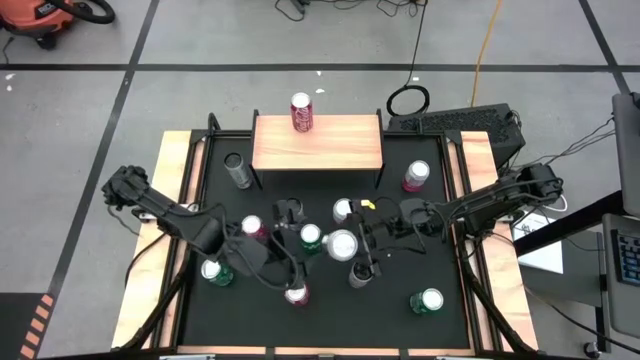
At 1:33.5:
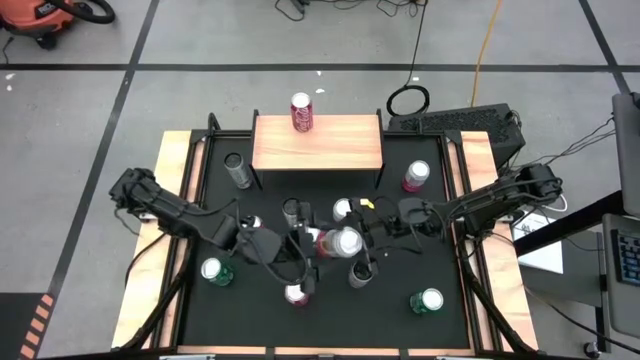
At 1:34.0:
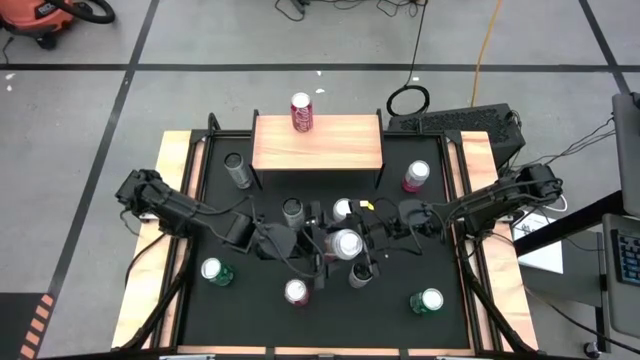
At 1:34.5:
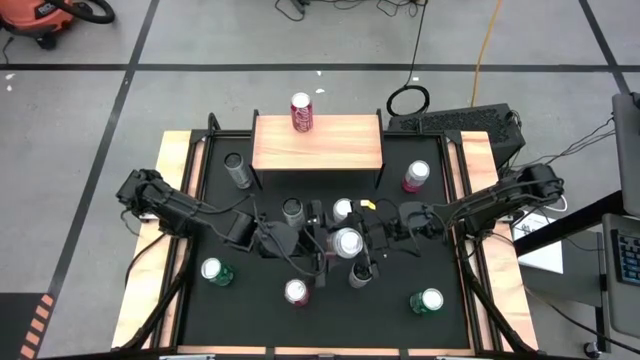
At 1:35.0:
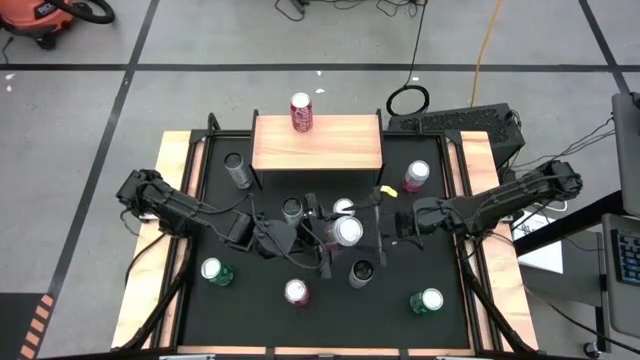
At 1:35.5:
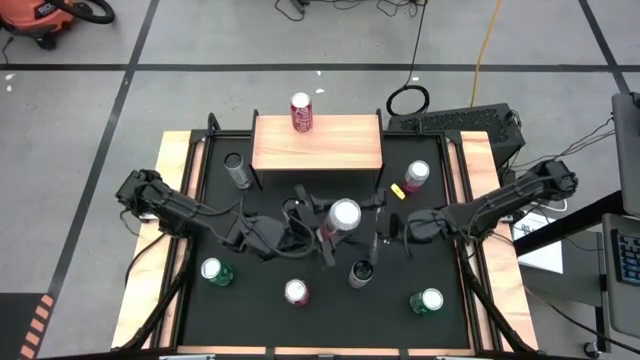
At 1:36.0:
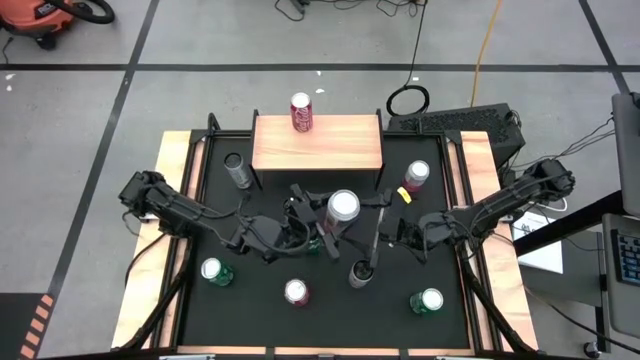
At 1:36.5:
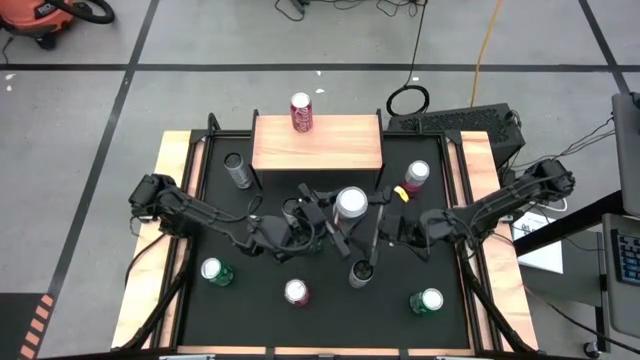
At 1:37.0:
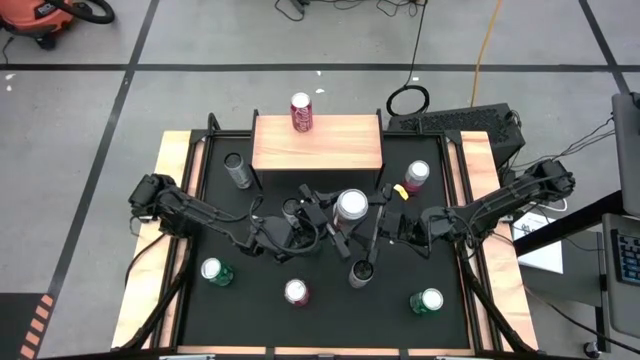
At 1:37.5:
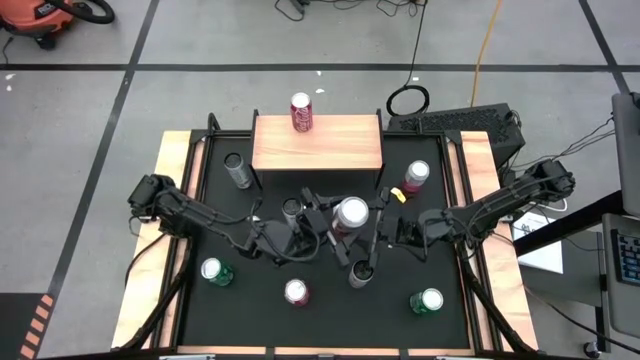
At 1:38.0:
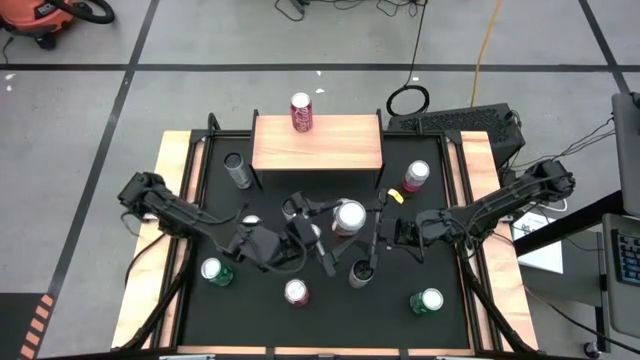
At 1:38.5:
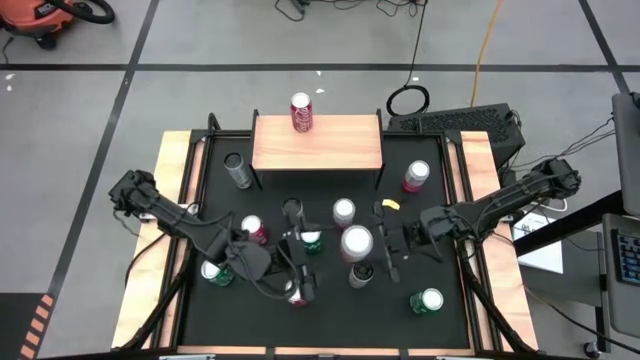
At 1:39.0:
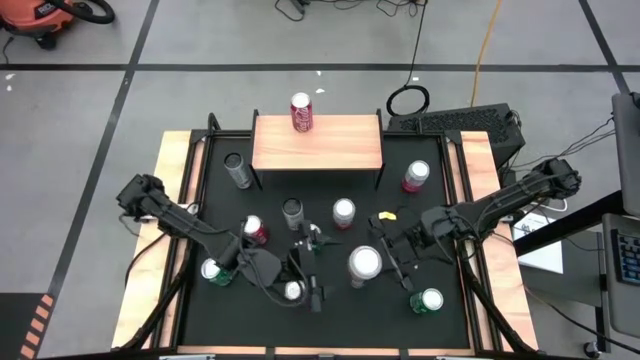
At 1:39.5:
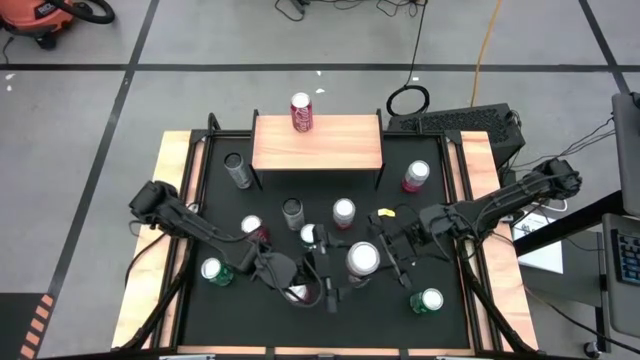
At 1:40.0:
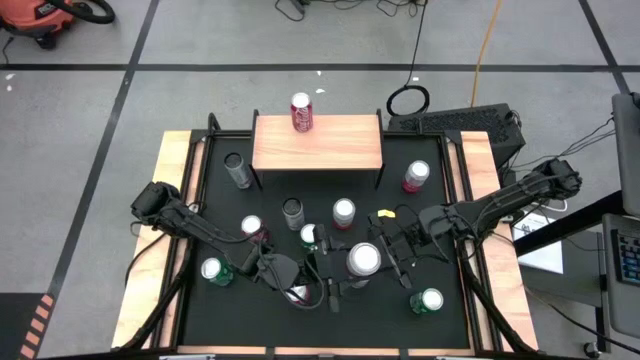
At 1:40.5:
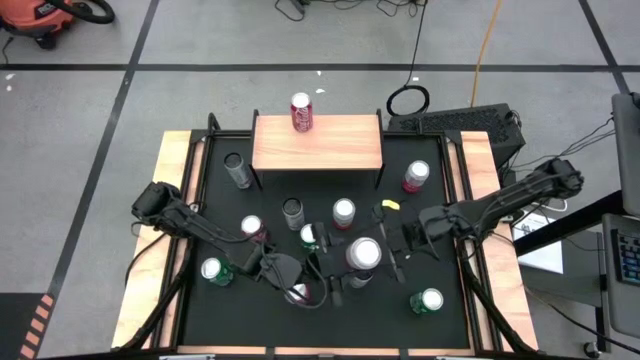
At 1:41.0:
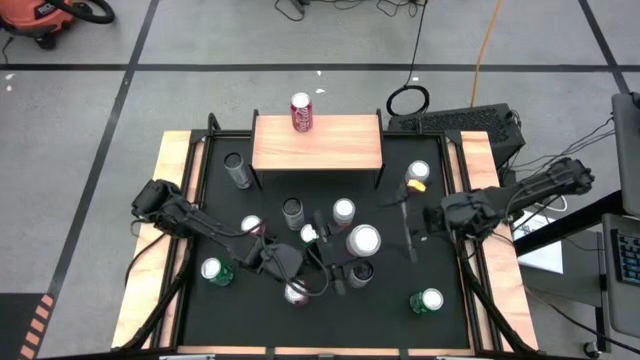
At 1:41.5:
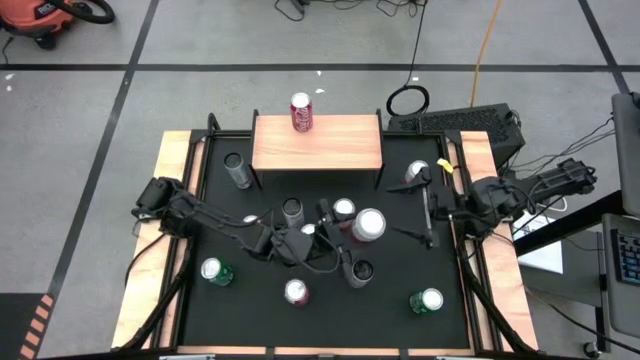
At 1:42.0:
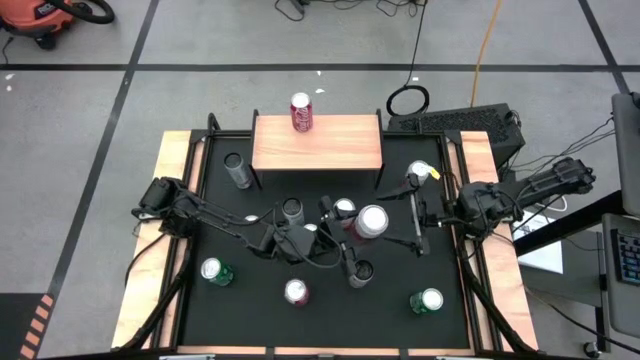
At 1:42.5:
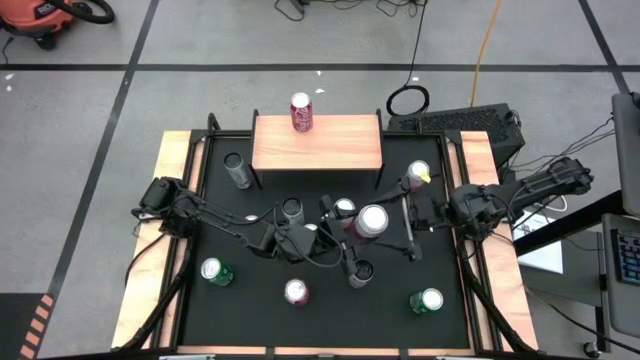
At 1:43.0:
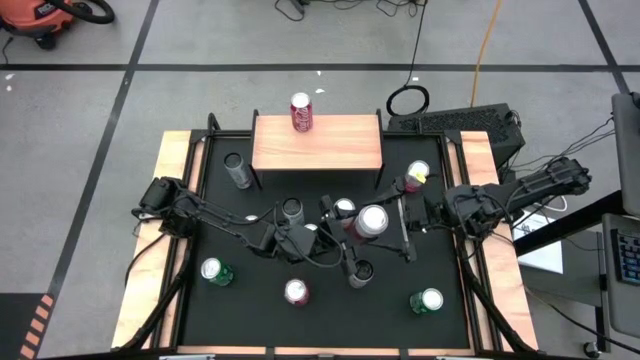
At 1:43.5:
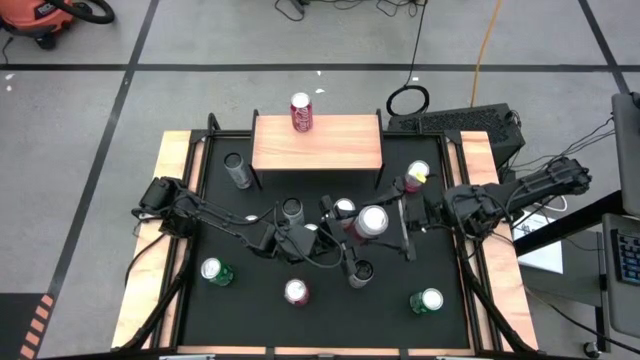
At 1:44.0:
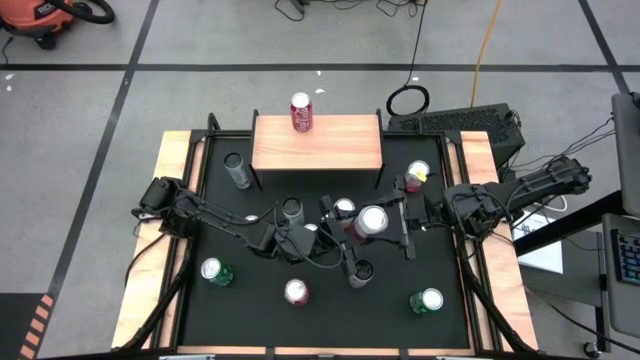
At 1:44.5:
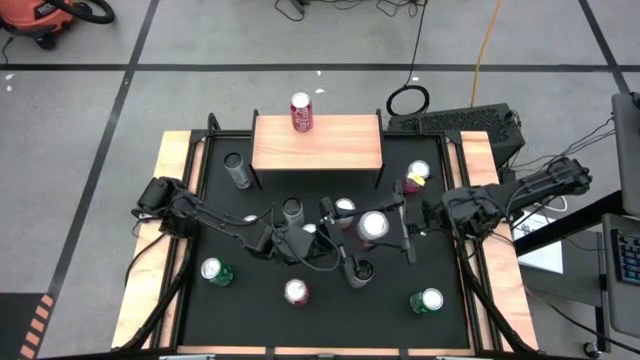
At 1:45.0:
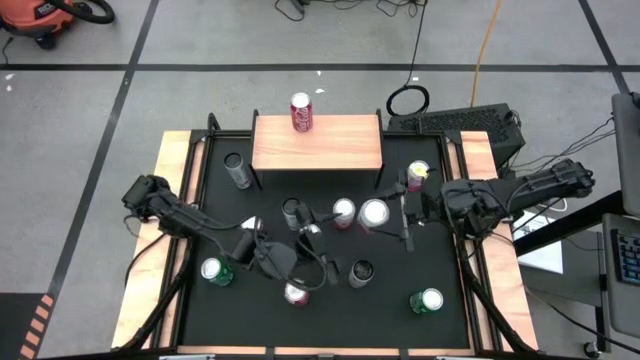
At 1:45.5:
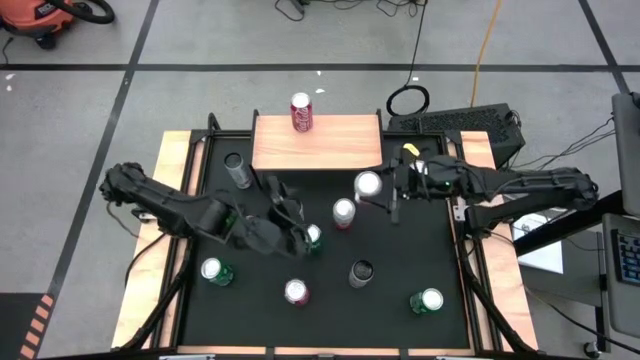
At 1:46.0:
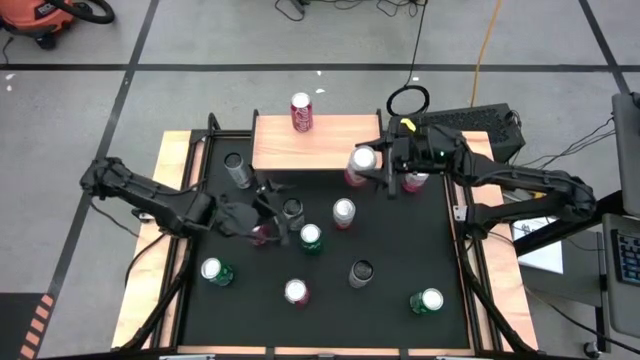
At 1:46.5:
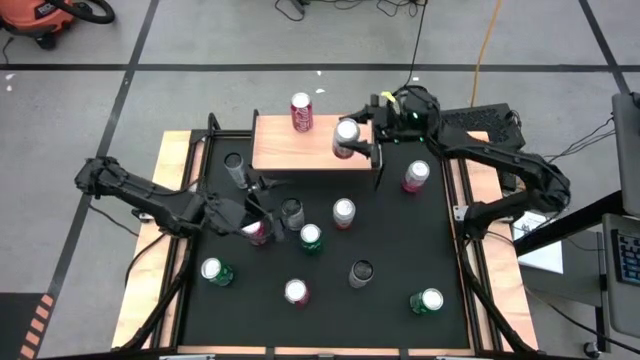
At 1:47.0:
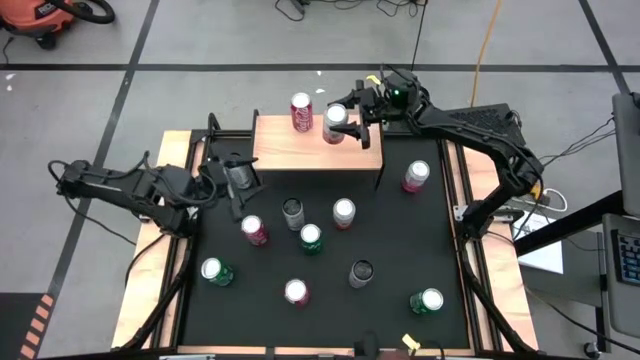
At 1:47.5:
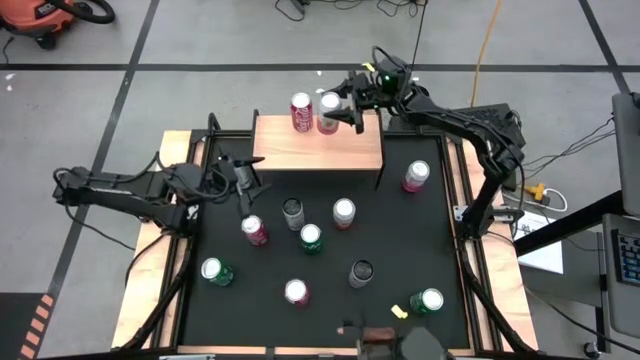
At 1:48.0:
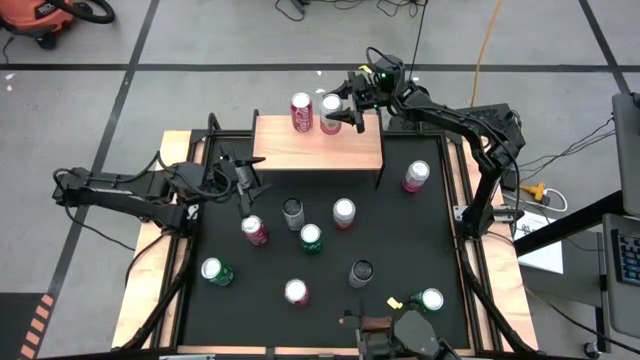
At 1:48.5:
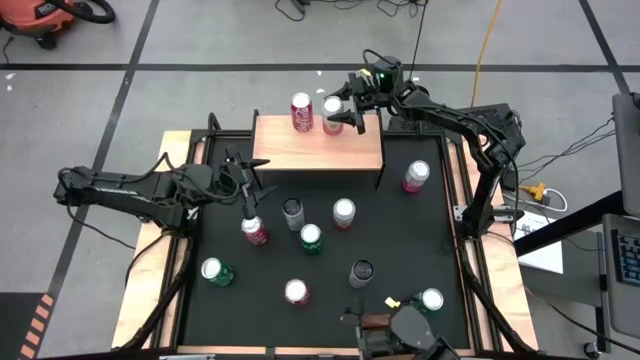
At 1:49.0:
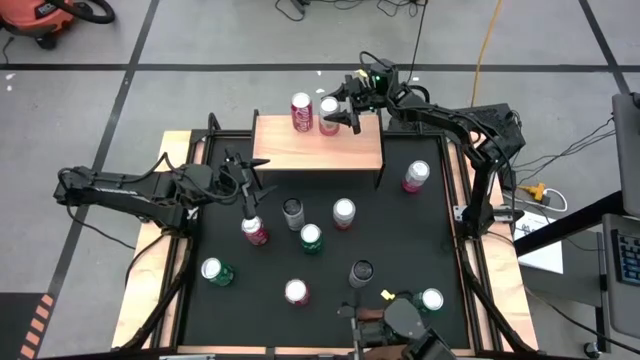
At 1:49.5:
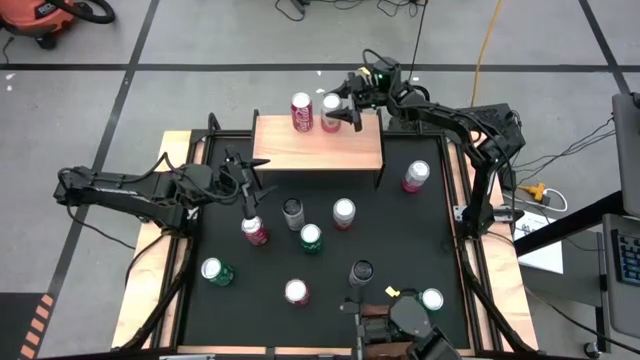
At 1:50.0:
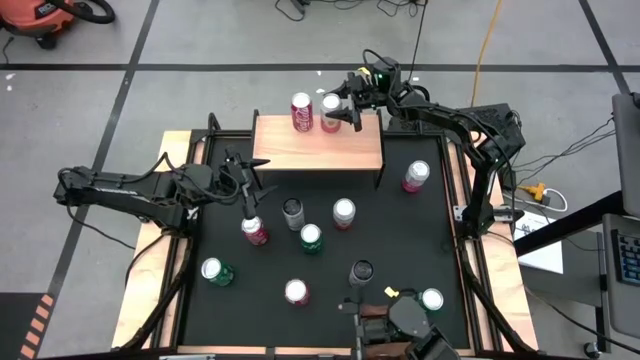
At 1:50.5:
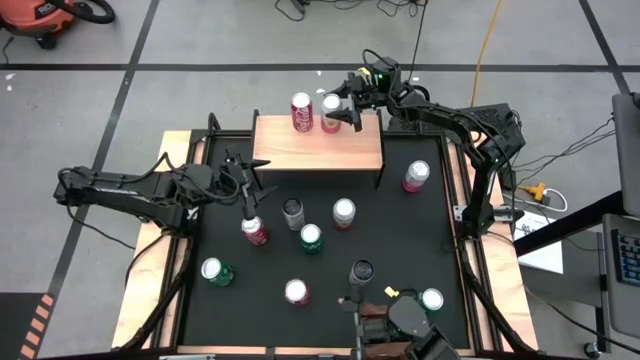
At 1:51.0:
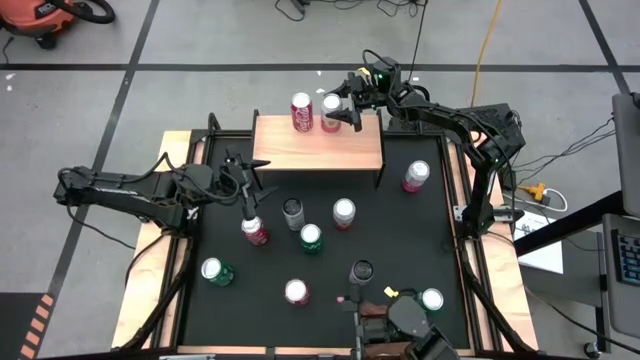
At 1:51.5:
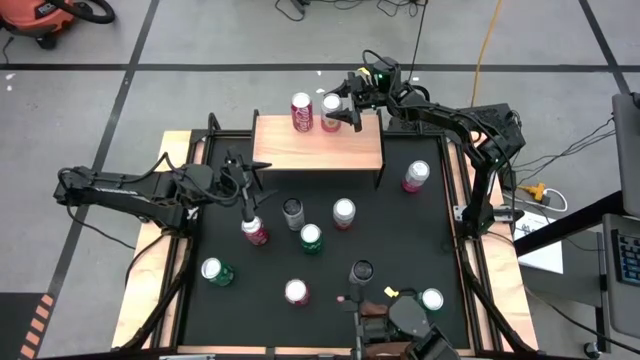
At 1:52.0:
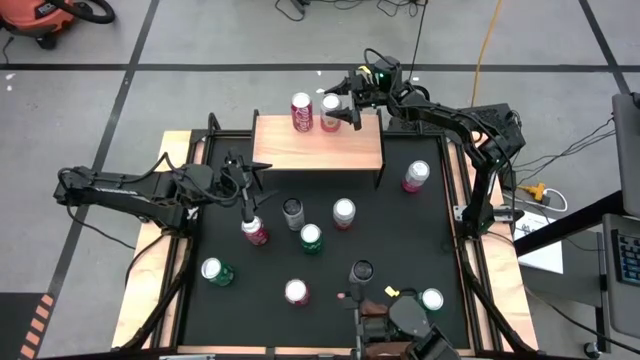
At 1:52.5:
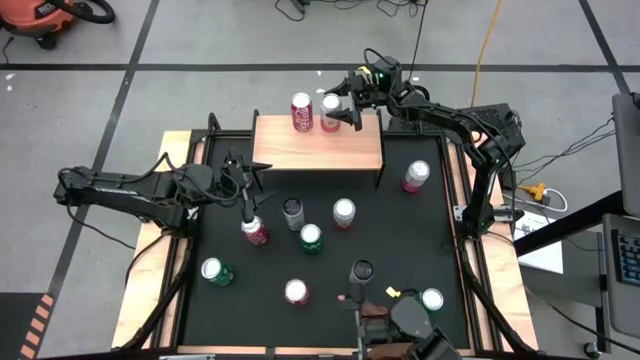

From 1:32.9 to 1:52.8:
Task: Place canned beverage on shelf
Put the bottom white pink soda can on the shelf

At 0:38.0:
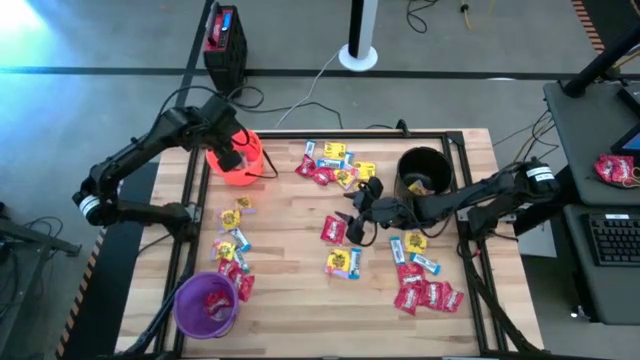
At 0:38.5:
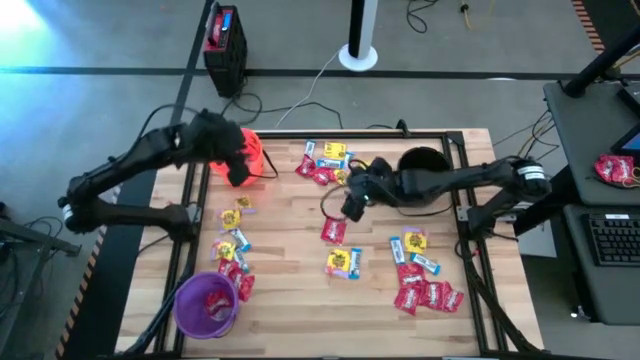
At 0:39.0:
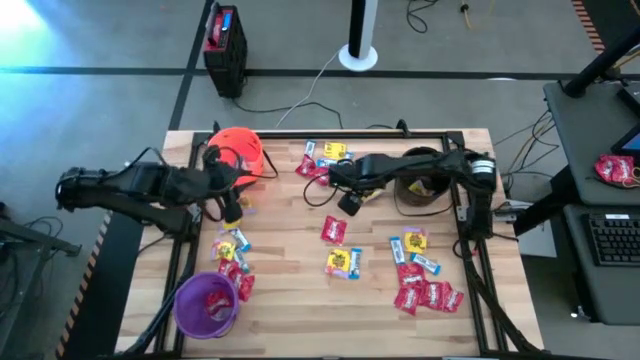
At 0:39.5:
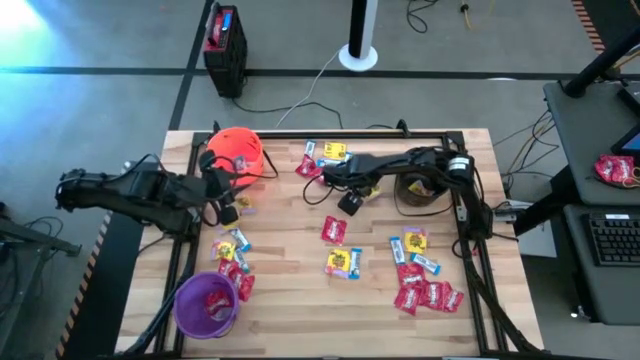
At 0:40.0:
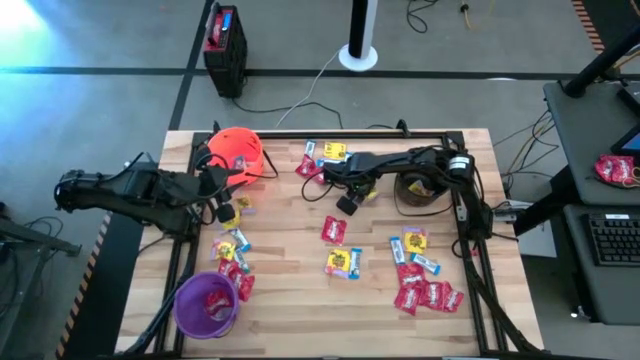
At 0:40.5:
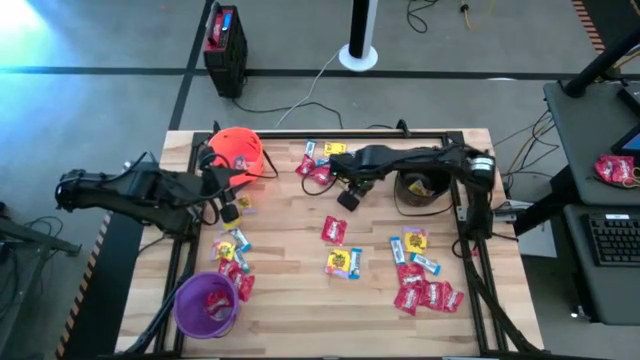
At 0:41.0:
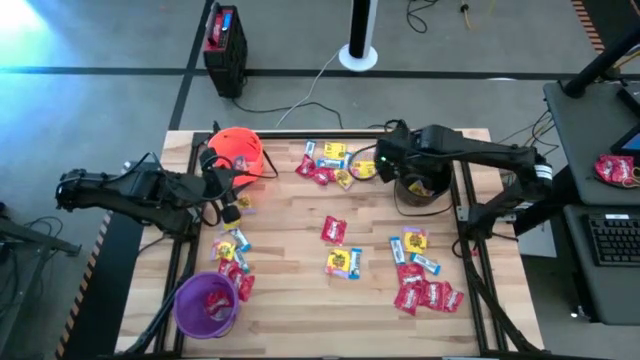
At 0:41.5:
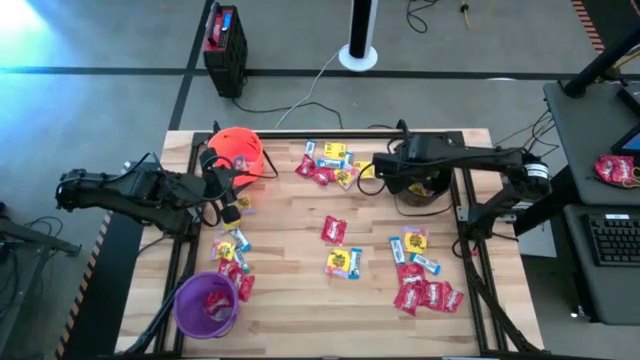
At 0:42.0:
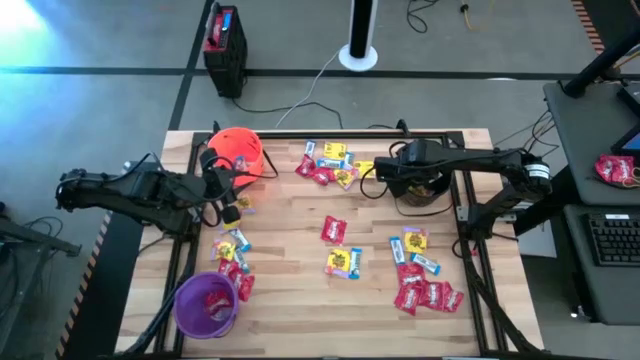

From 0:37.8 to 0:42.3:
Task: Sort candy by brand, put in halloween buckets
Put the yellow candy into the black bucket
